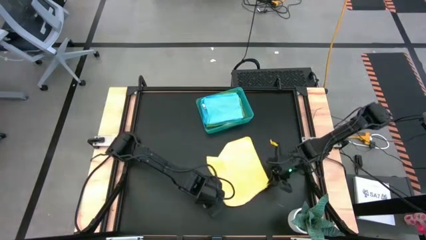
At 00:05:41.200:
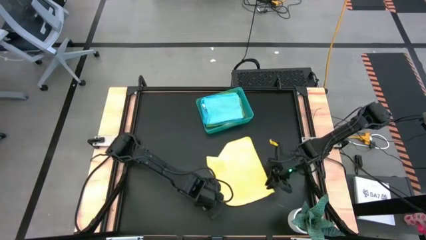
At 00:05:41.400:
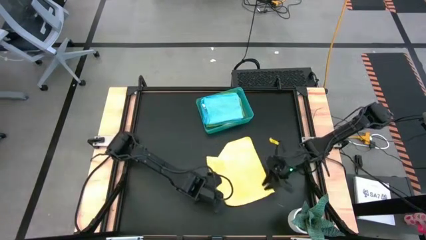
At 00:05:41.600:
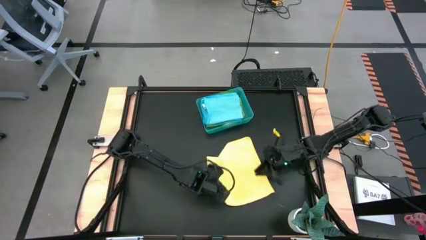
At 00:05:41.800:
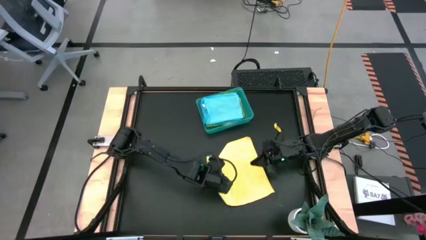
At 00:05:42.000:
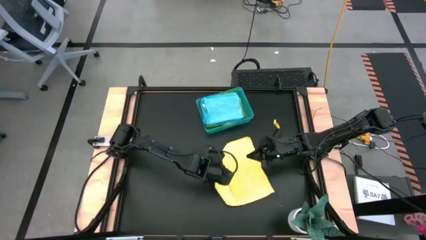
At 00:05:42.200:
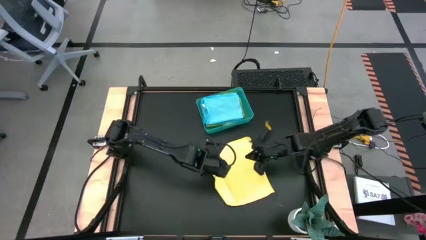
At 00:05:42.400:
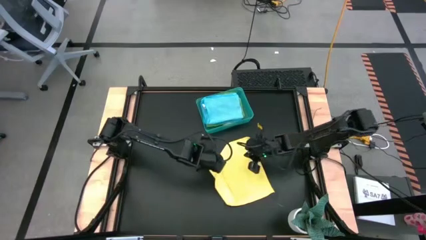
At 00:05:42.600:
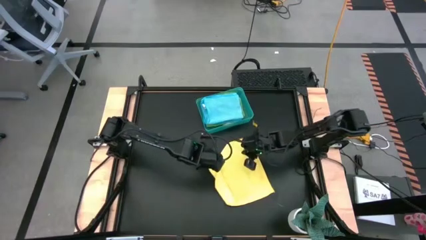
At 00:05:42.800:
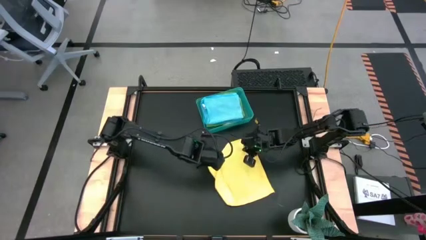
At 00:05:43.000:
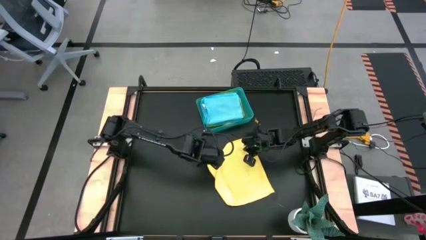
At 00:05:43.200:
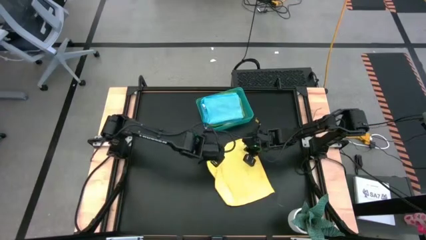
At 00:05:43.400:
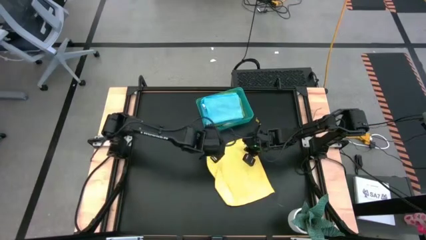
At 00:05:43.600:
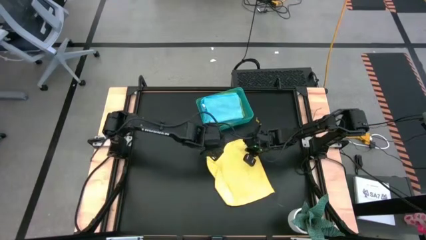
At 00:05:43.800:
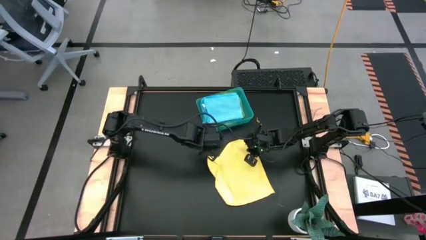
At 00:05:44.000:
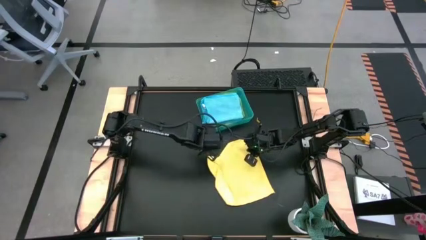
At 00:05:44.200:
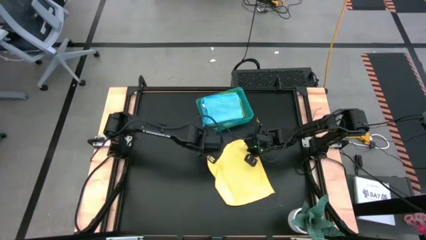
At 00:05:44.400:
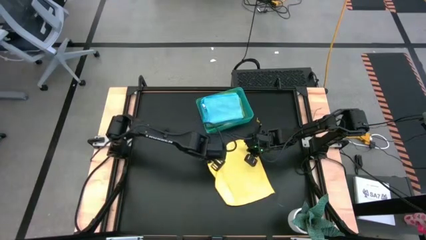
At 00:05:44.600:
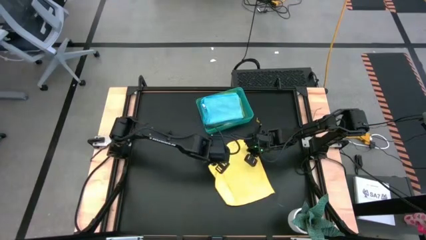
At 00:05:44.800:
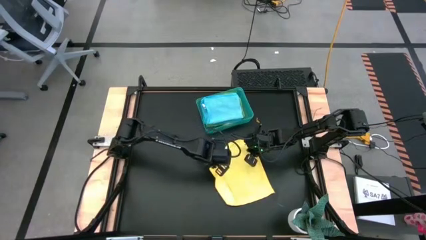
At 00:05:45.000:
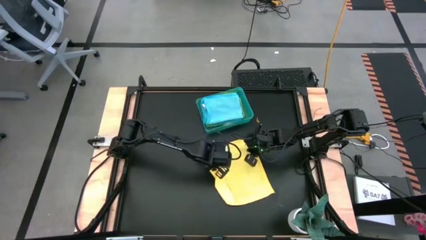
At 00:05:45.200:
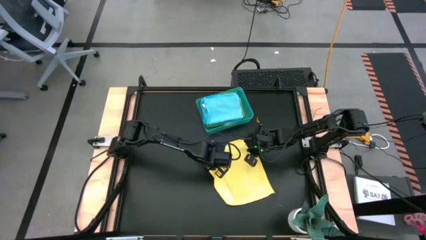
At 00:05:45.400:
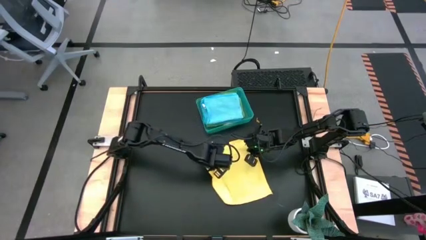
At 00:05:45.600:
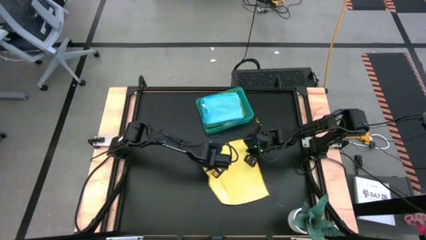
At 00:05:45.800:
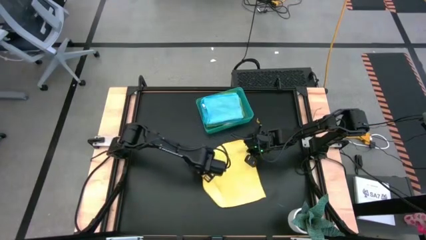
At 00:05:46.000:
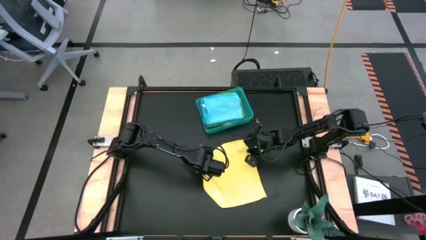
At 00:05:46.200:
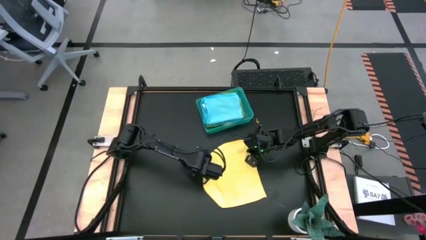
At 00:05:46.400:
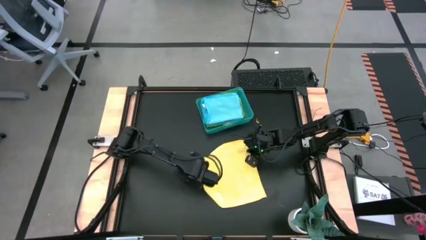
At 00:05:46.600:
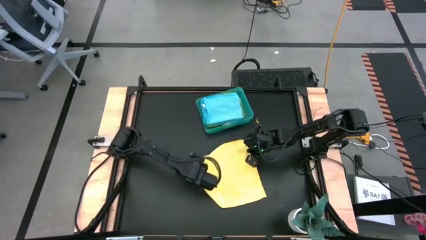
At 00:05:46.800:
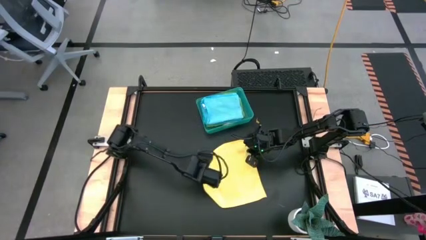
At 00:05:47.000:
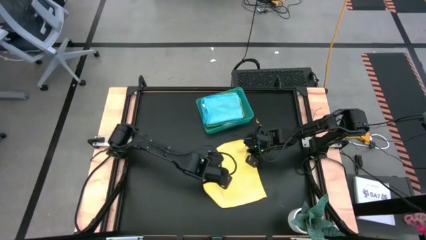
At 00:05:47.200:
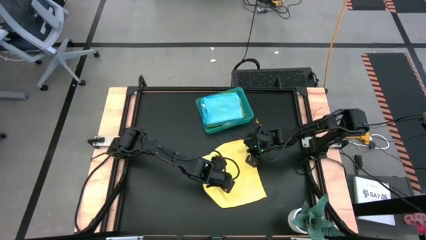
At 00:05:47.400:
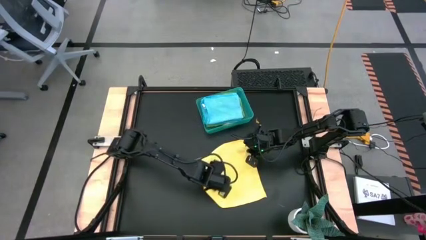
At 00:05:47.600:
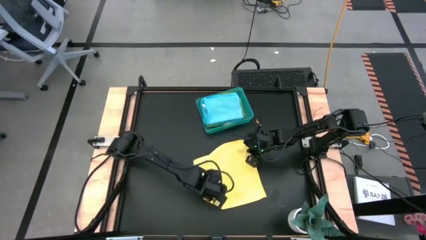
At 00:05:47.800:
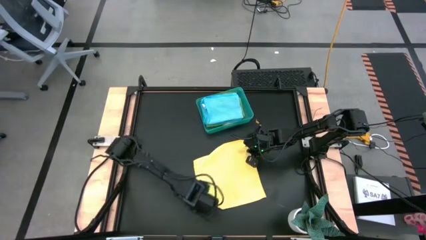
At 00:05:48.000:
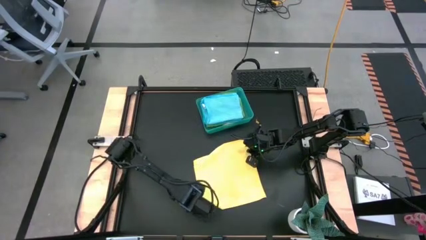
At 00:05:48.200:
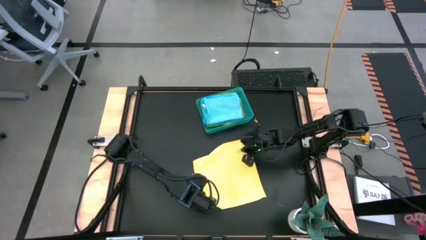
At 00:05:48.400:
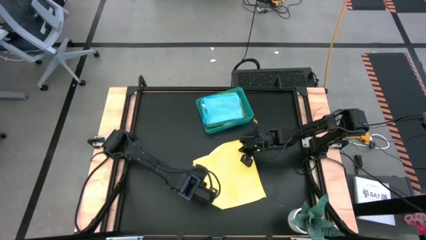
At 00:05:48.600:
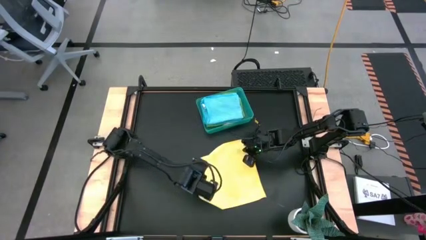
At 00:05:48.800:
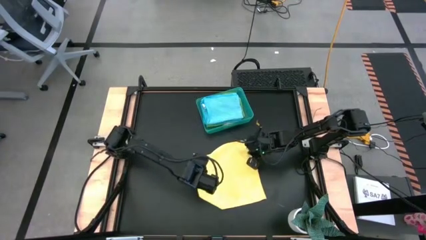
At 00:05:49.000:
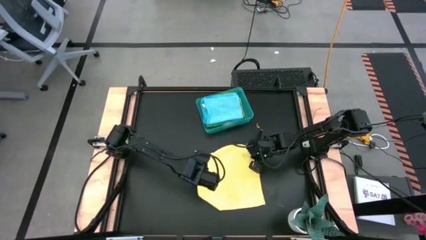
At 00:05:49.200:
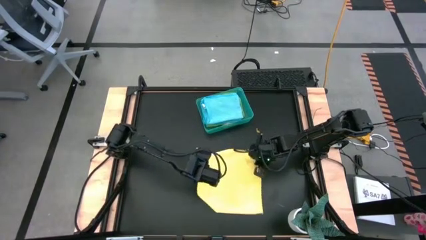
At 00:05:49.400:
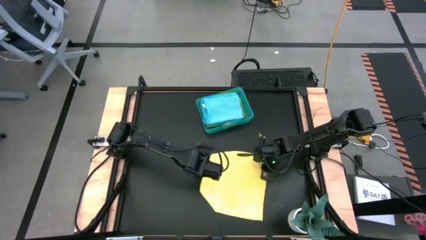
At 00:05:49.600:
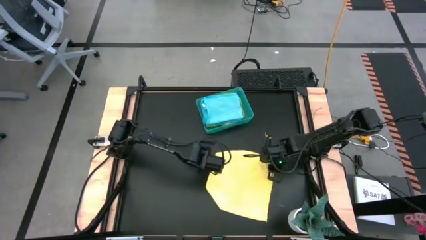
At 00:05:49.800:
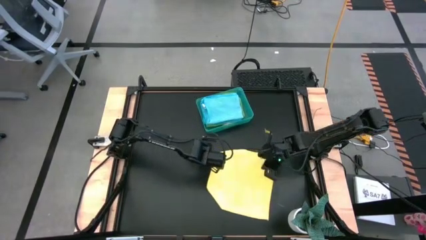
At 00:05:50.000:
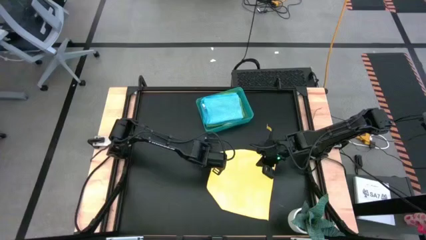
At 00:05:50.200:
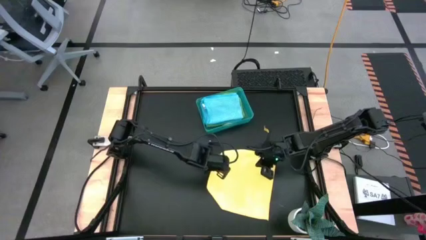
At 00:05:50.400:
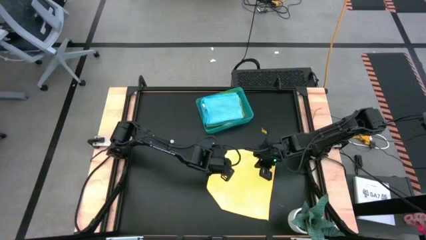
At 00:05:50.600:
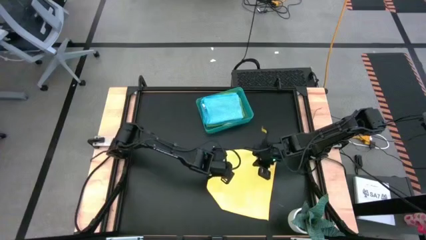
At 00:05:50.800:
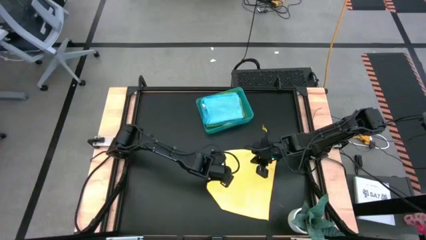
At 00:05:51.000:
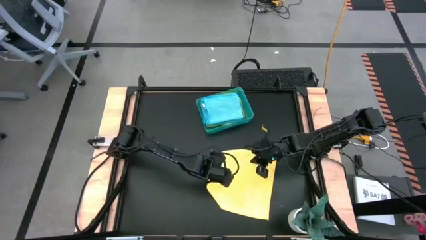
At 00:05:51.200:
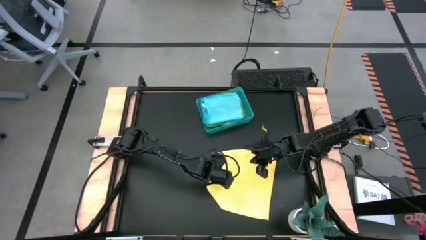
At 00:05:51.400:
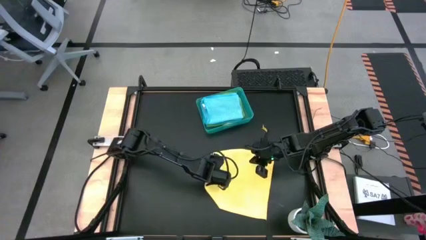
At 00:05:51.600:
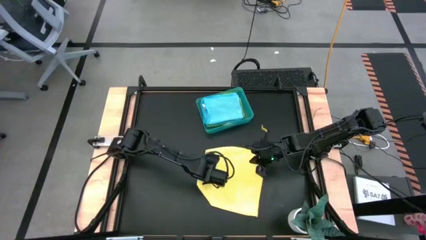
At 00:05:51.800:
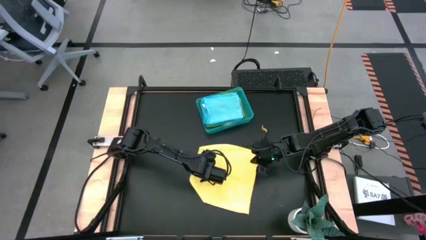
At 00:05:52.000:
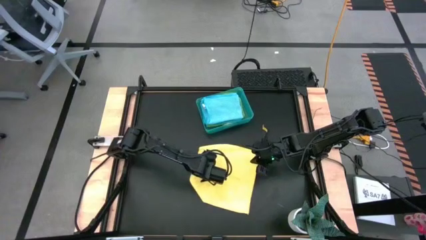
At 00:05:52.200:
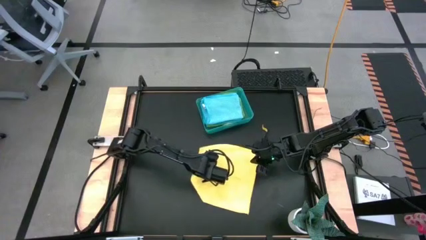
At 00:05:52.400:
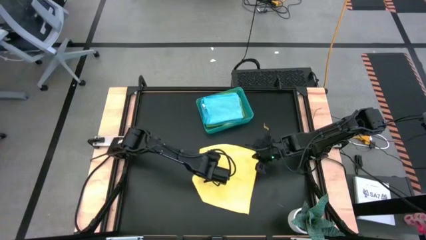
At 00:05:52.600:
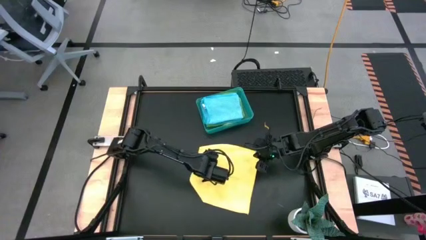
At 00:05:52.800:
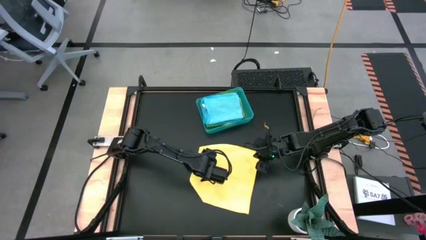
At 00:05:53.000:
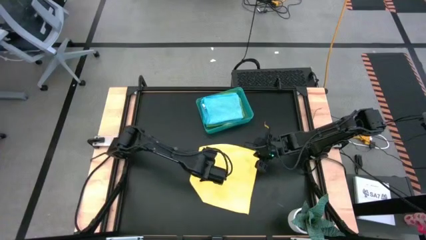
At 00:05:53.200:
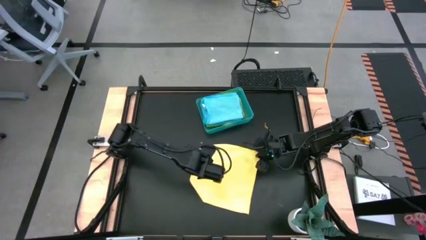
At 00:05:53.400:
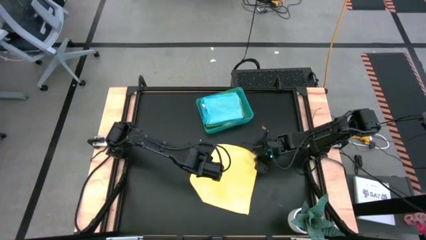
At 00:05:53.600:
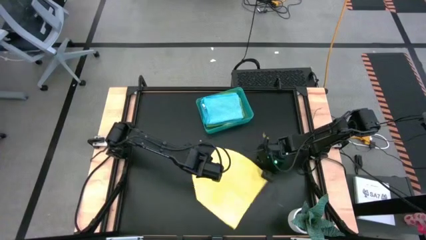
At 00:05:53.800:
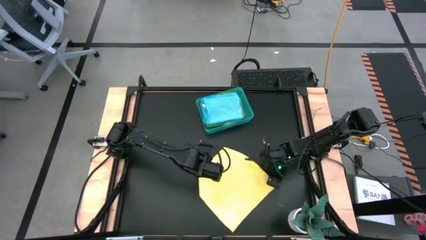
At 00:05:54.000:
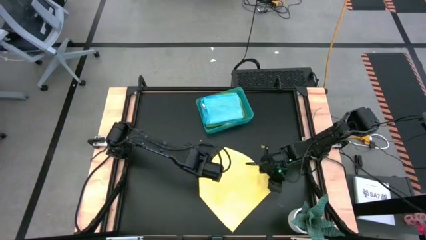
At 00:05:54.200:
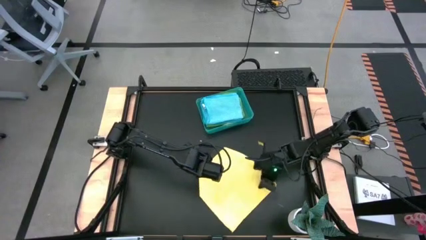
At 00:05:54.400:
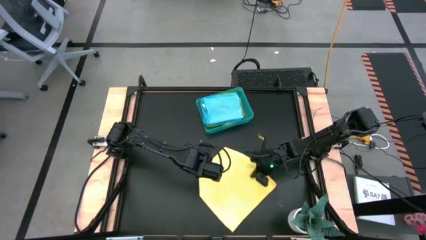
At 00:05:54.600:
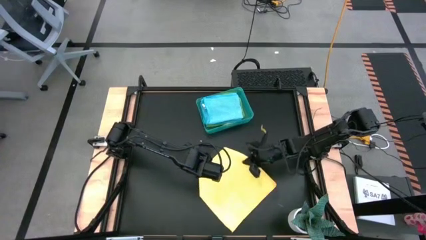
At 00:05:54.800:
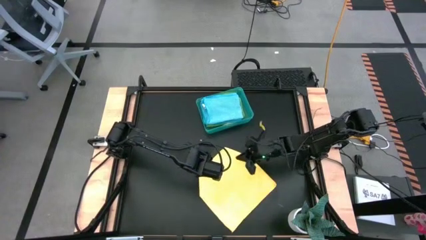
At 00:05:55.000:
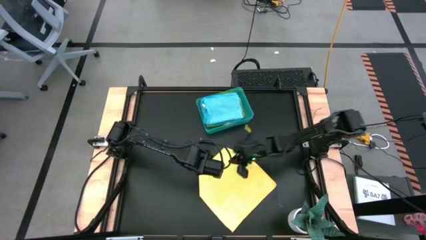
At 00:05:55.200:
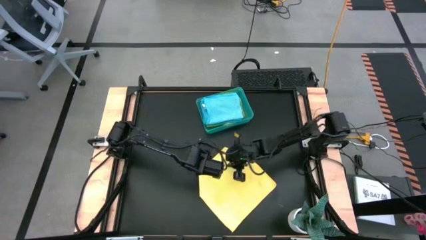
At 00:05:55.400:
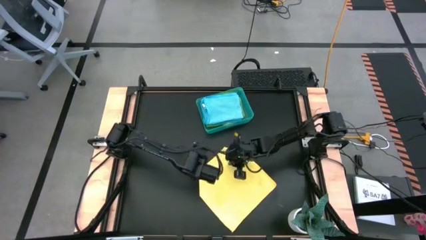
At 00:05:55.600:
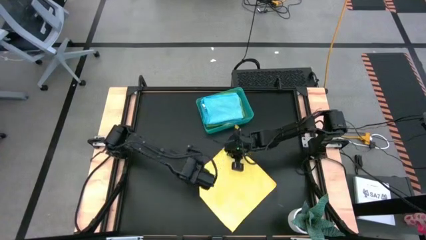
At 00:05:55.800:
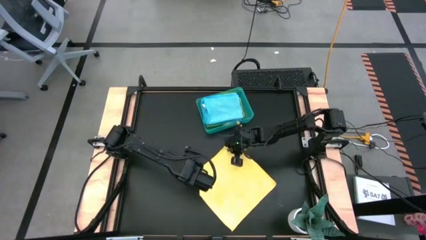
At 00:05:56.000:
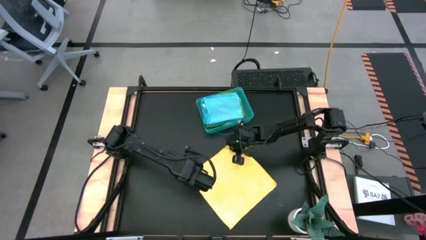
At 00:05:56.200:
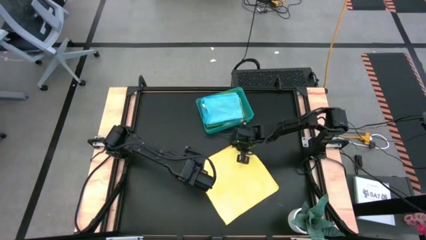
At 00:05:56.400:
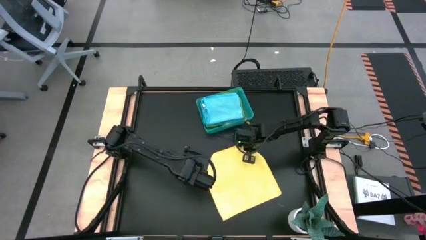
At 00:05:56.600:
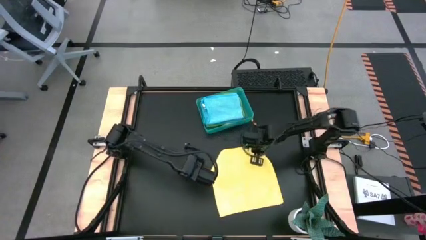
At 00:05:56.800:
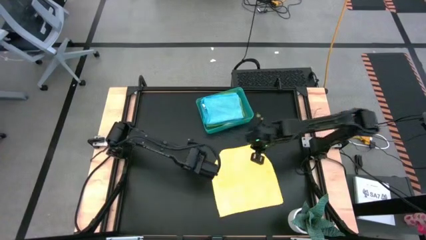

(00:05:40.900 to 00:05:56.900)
Task: Fold microfiber towels
Fold the yellow microfiber towel
